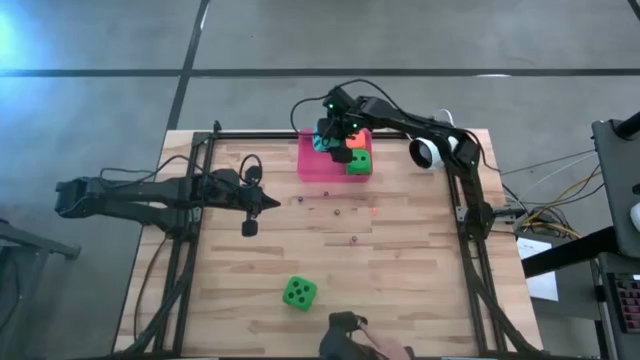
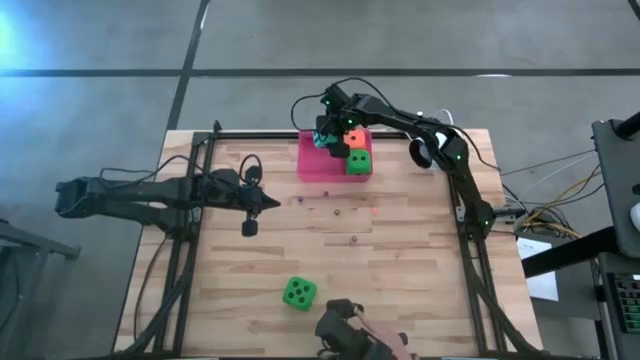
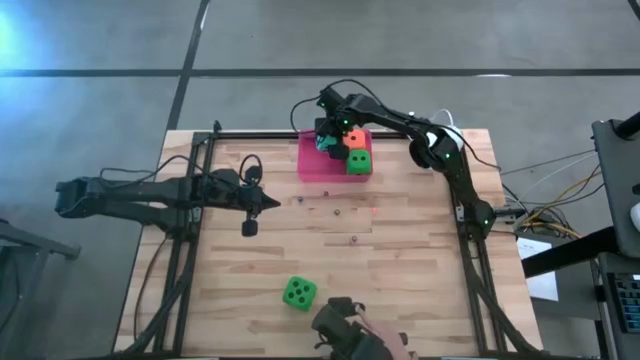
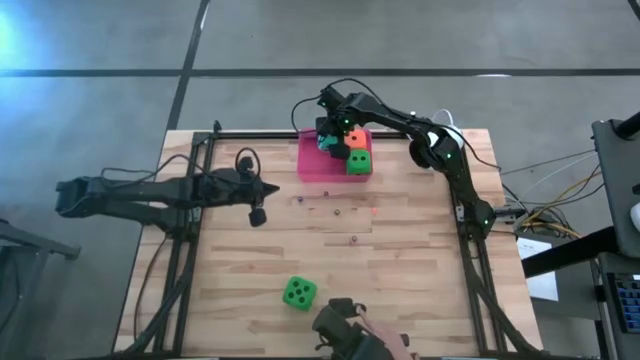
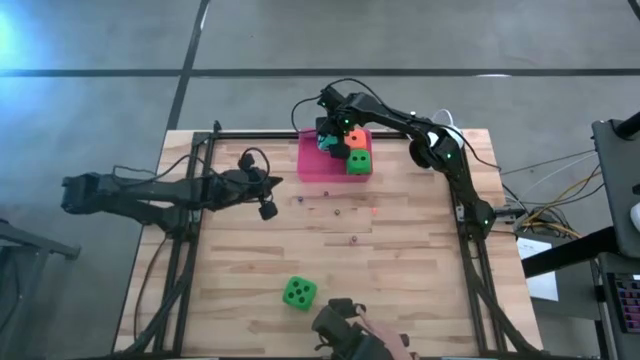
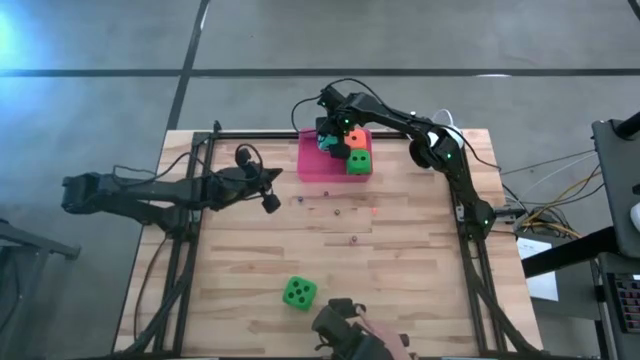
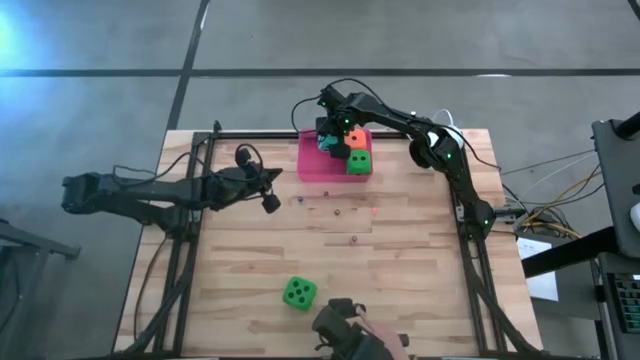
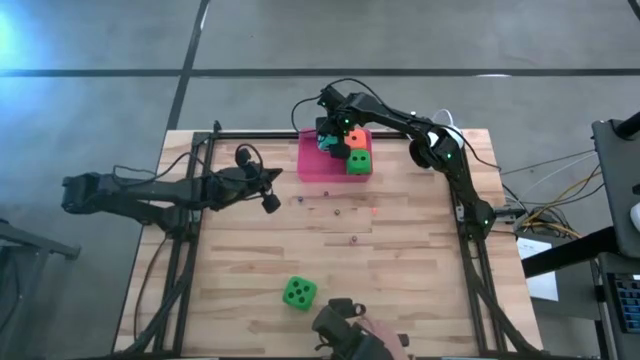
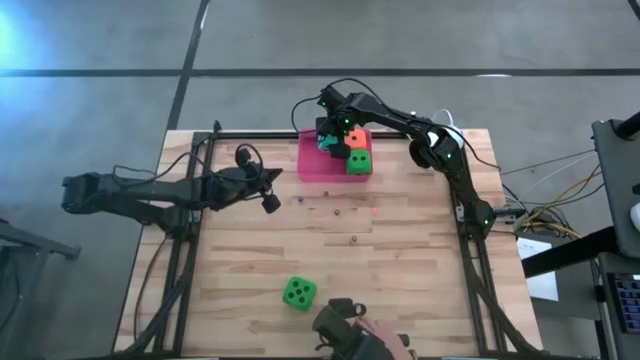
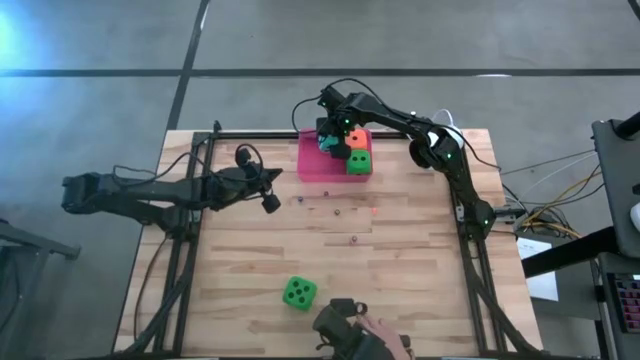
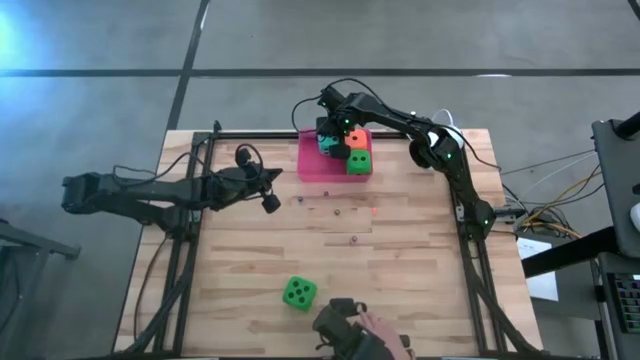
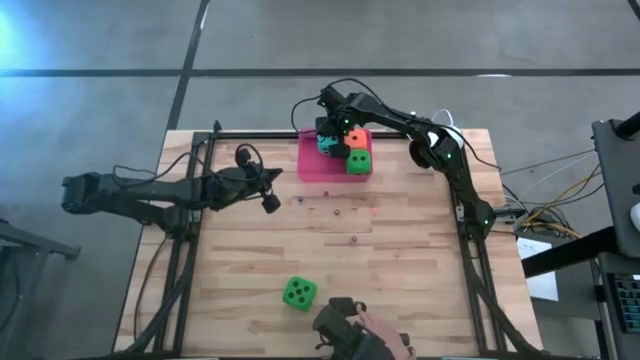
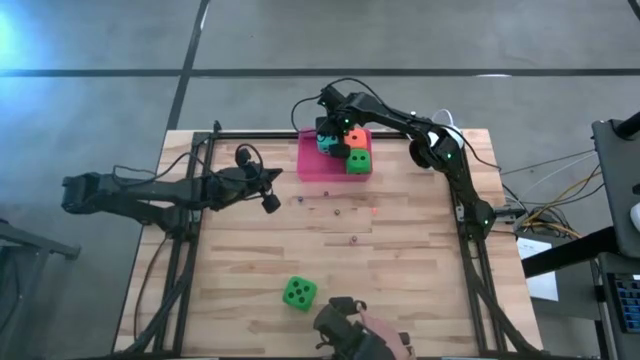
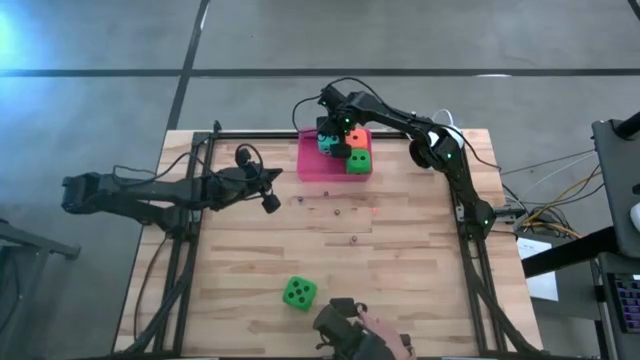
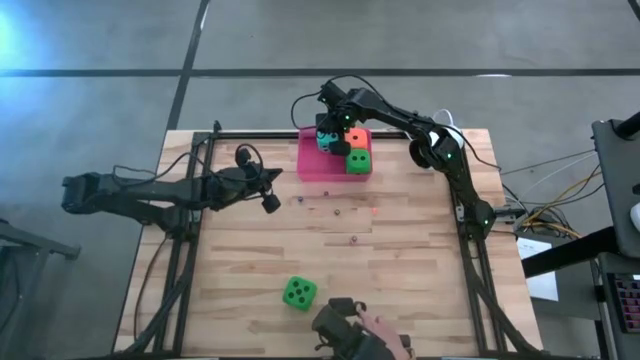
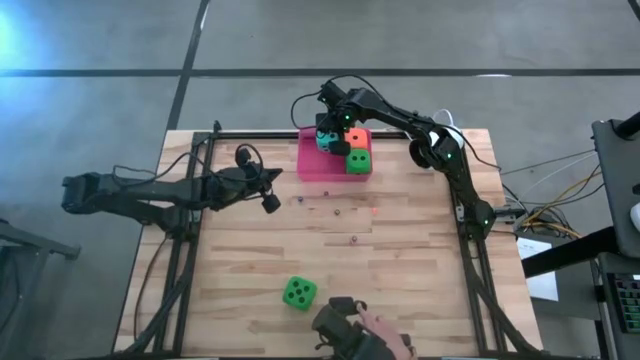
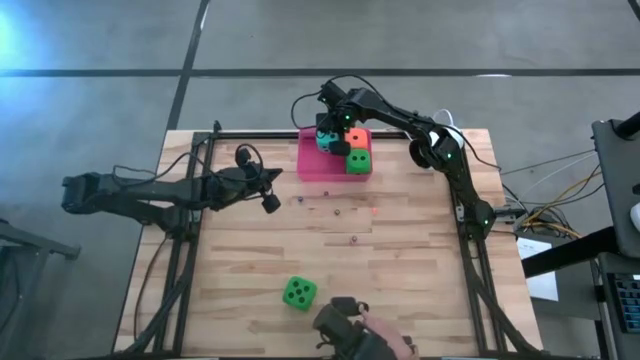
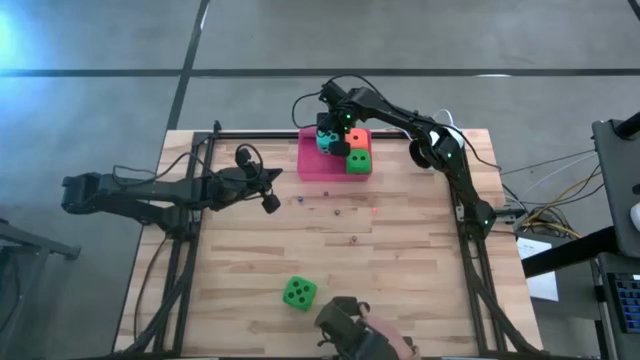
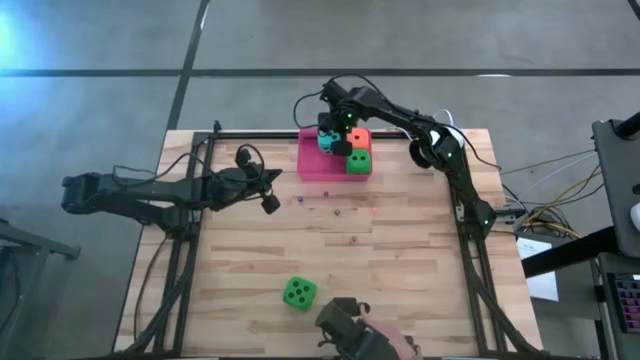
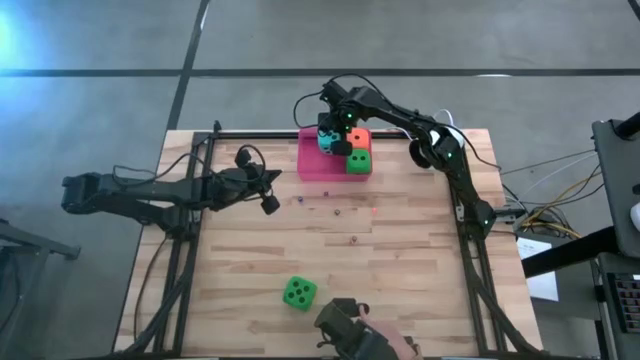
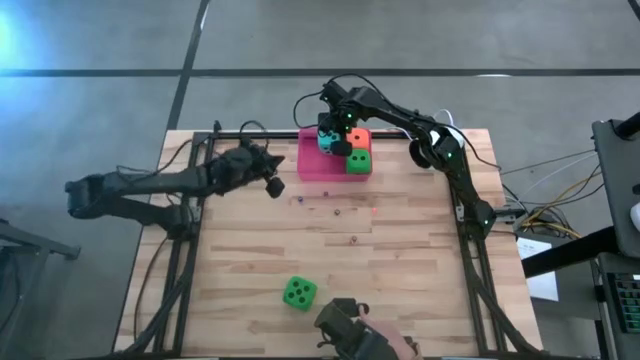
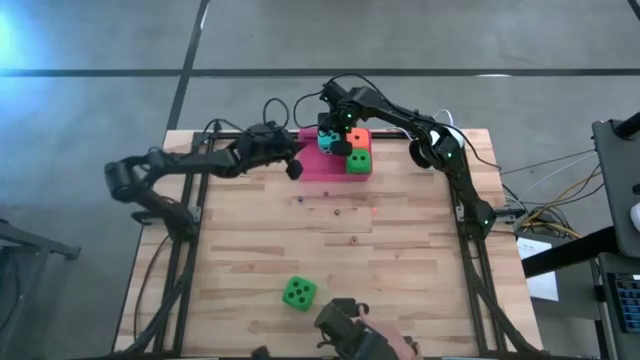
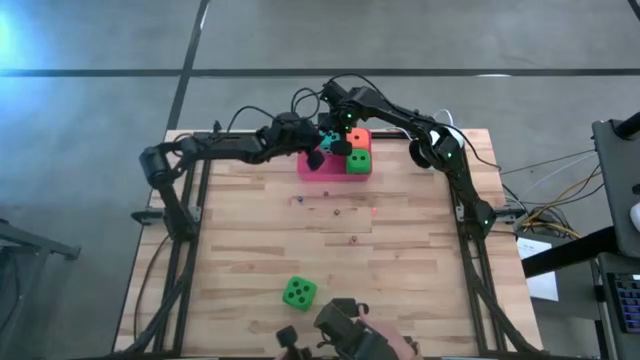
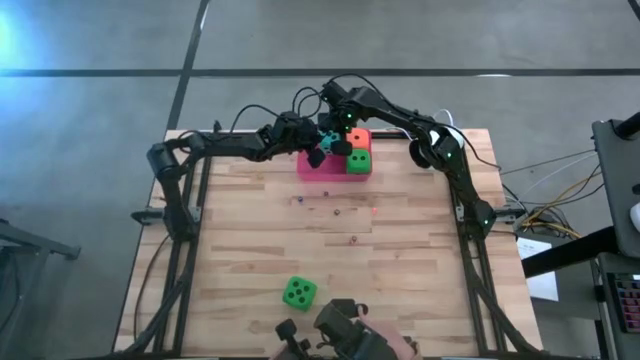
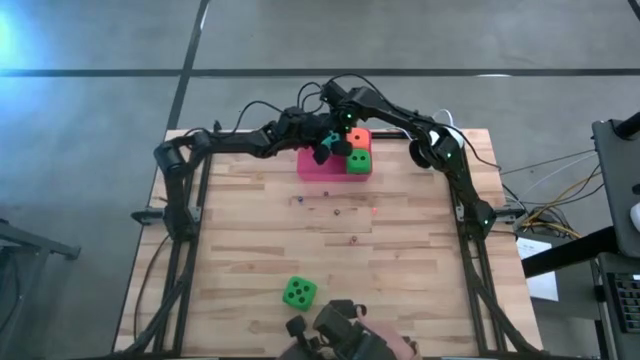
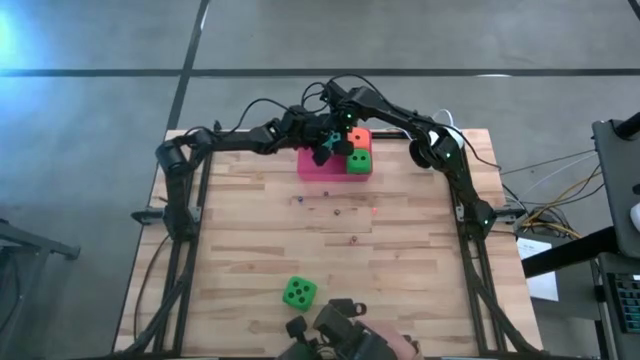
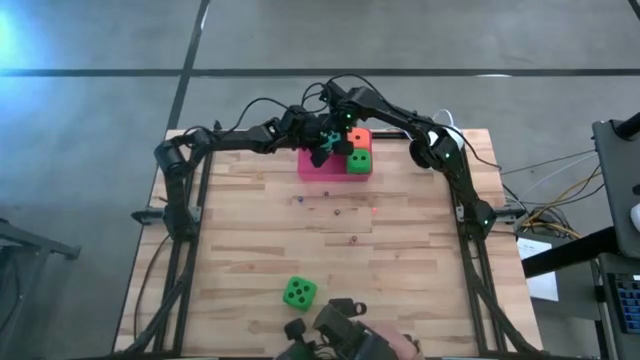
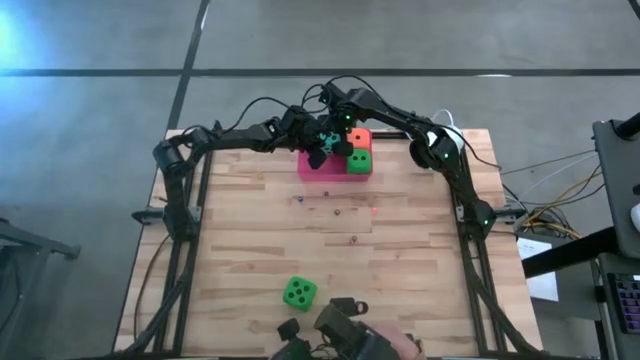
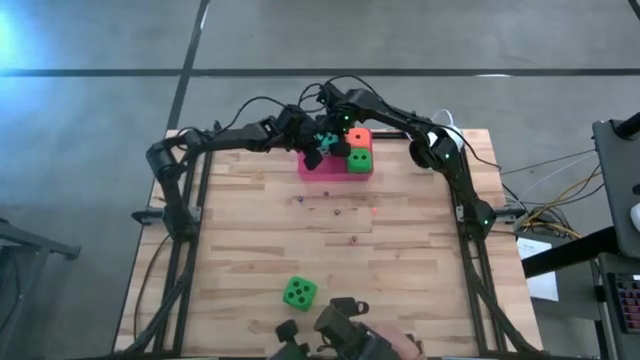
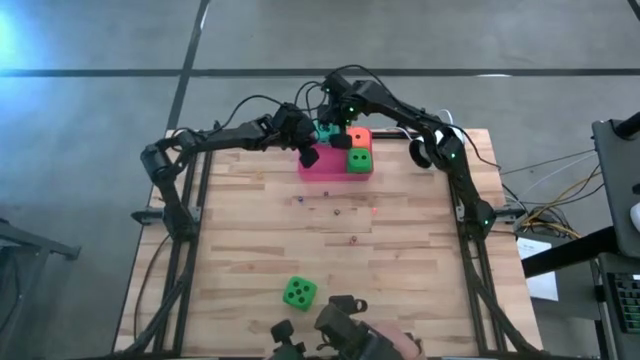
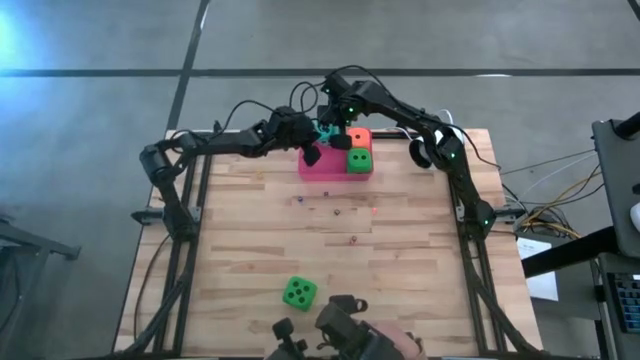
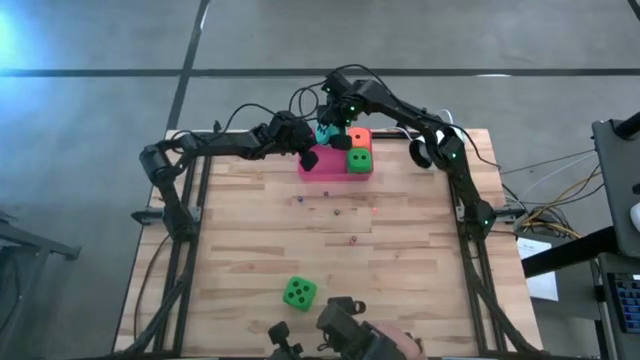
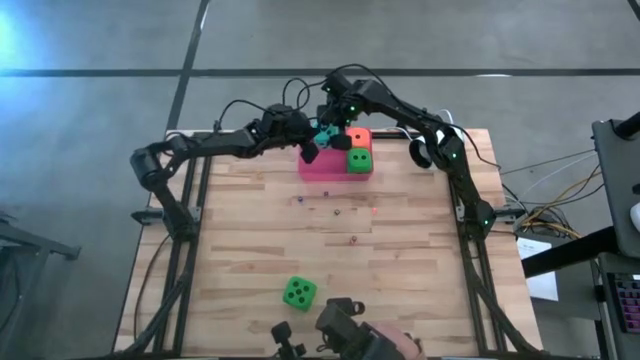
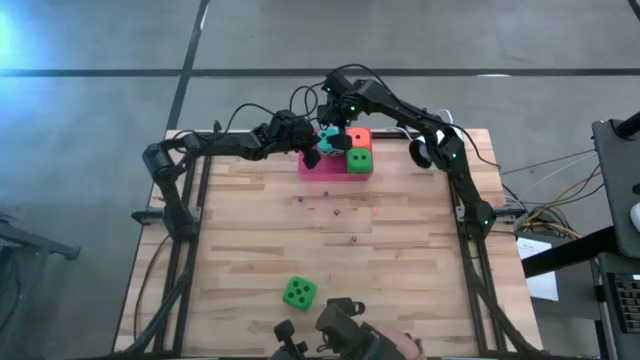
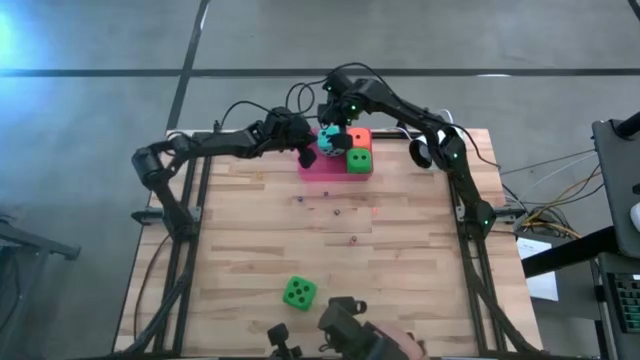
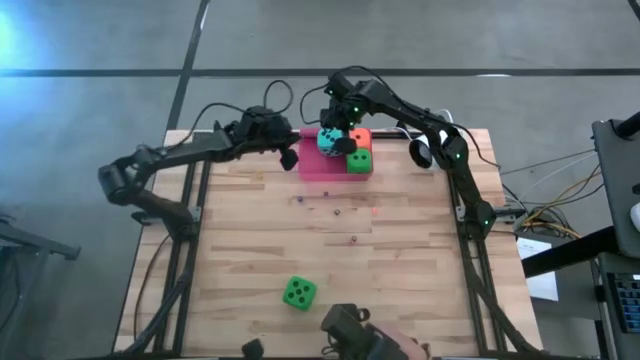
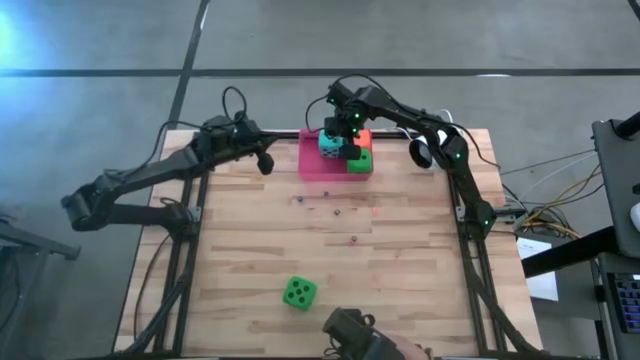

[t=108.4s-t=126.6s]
Task: Pick & Place Dice
Put the large blue dice into the the pink bin

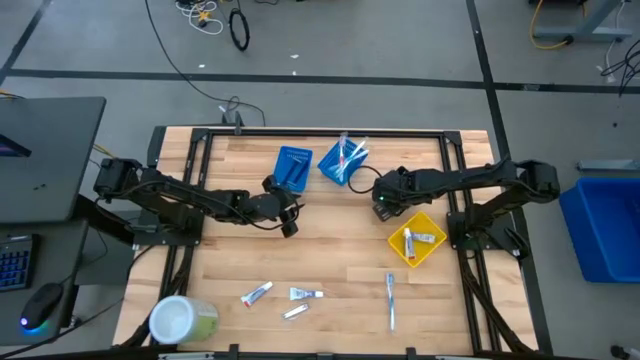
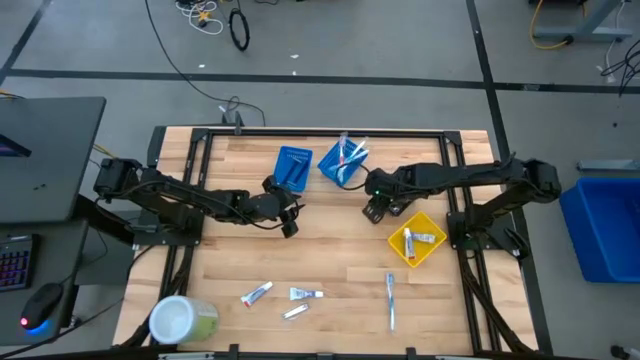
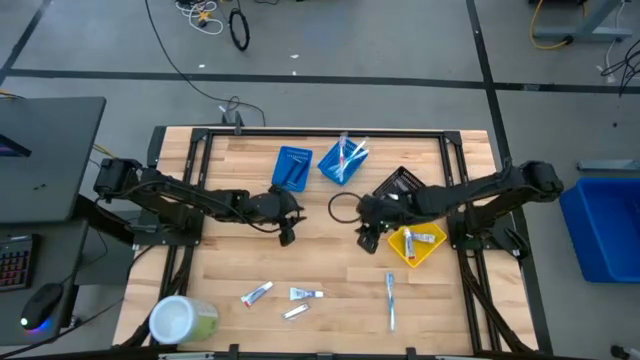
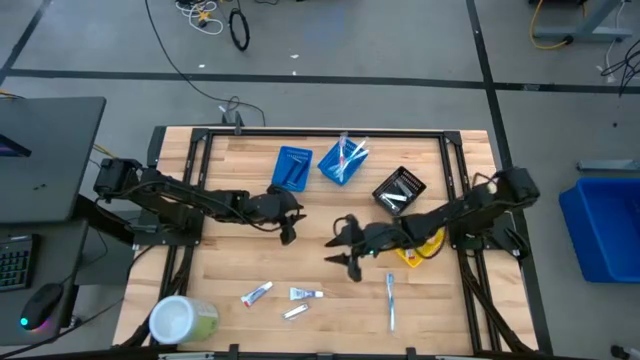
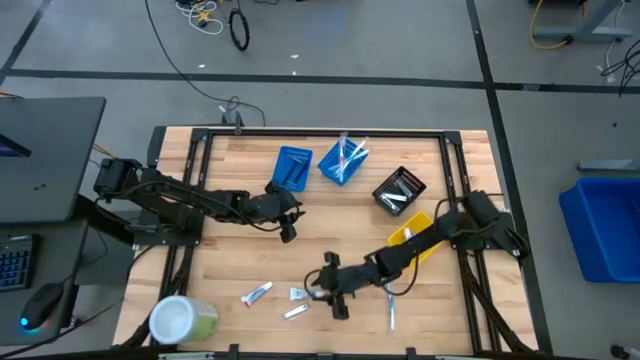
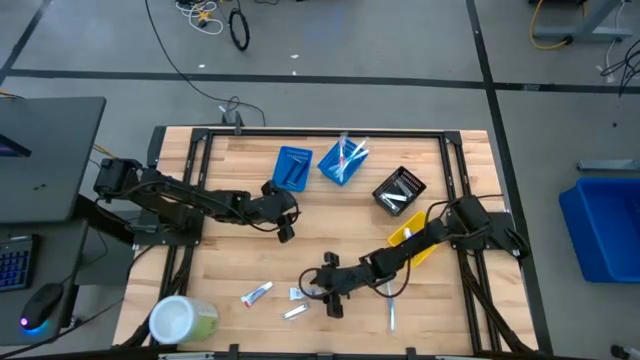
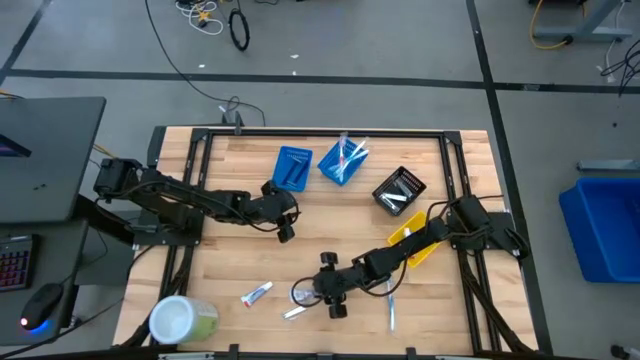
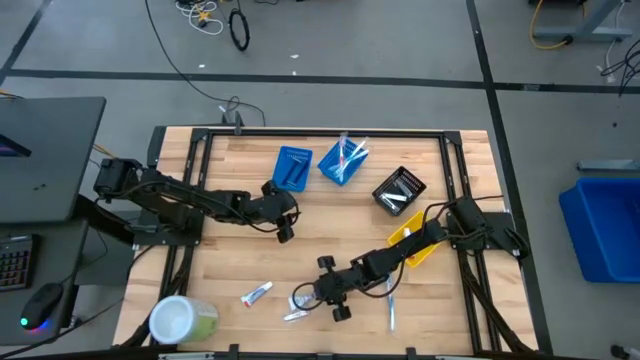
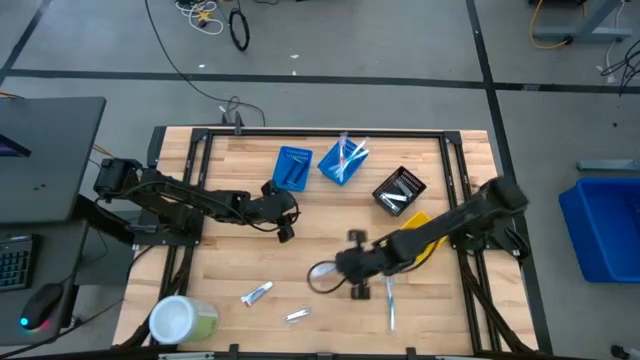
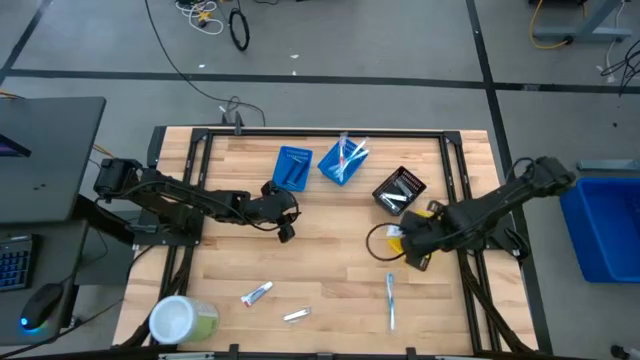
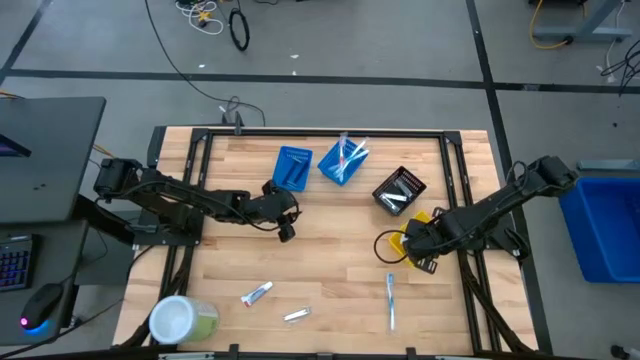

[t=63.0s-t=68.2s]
Task: Pick & Place Travel size toiletries
Put the white toothpaste into the yellow basket
